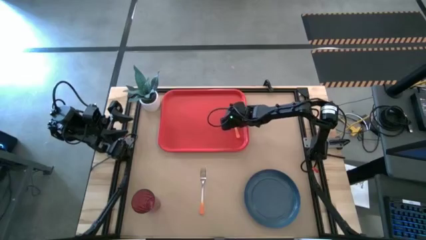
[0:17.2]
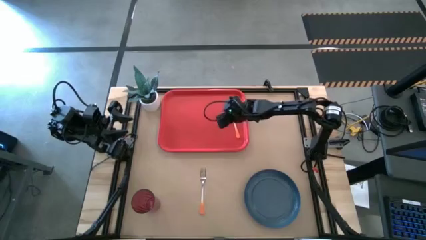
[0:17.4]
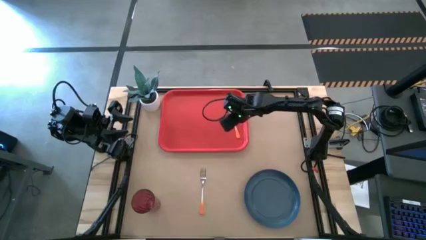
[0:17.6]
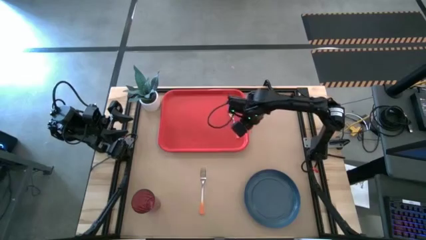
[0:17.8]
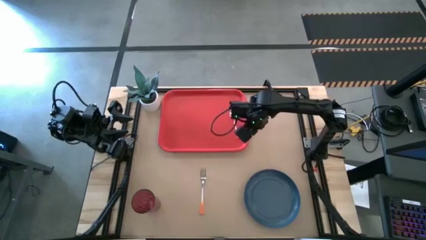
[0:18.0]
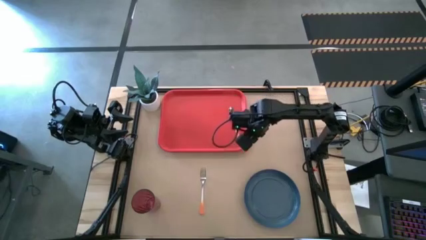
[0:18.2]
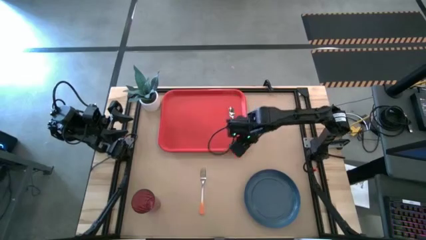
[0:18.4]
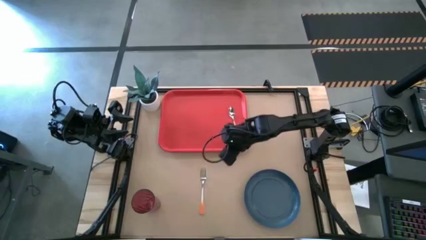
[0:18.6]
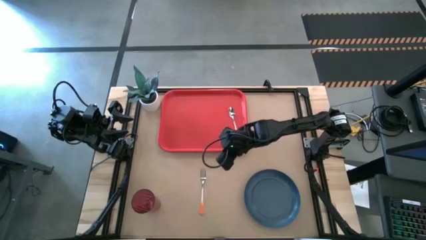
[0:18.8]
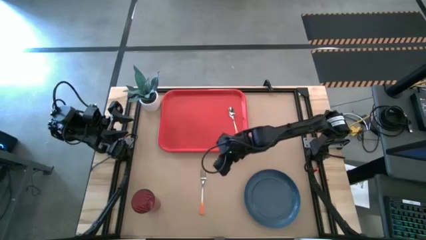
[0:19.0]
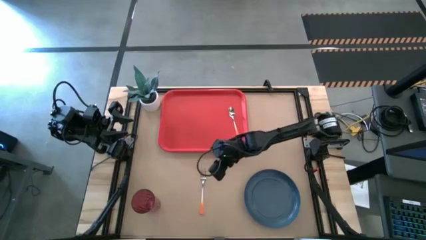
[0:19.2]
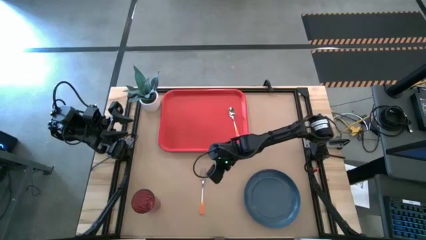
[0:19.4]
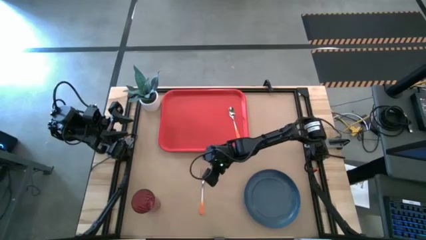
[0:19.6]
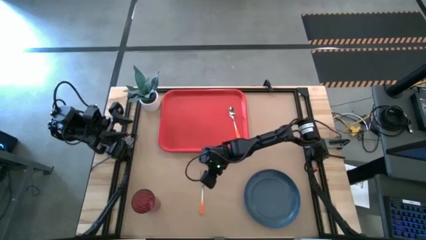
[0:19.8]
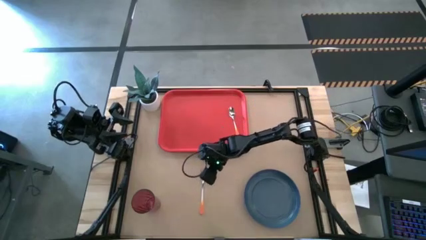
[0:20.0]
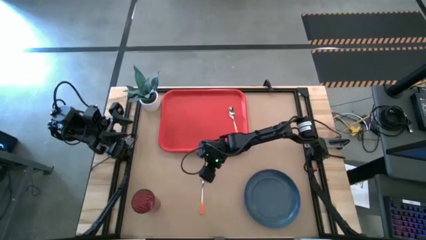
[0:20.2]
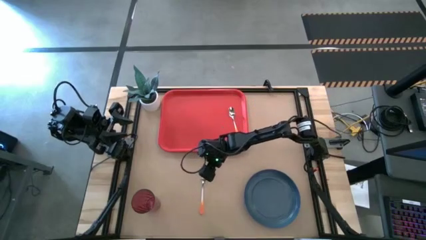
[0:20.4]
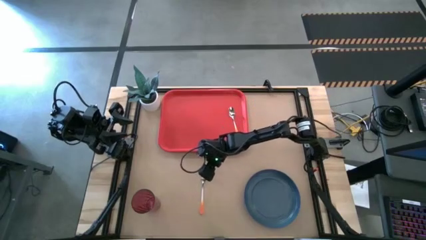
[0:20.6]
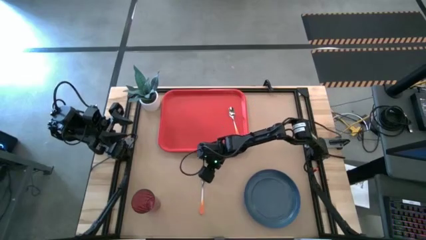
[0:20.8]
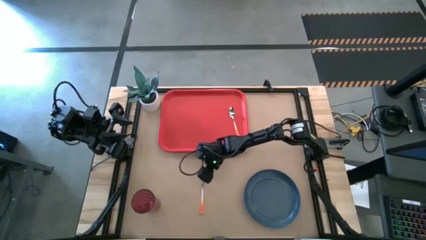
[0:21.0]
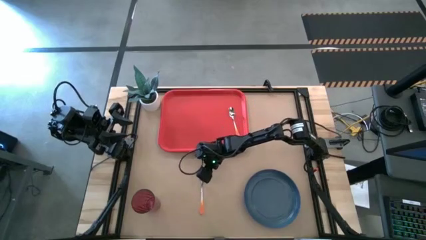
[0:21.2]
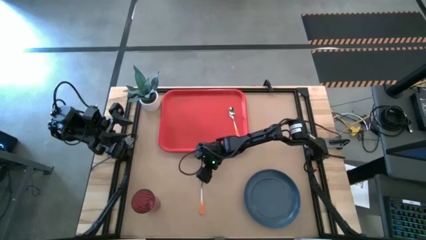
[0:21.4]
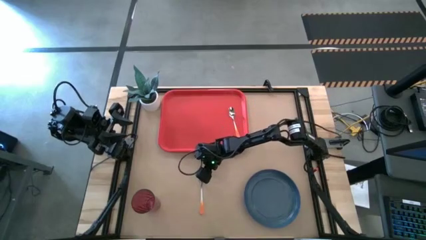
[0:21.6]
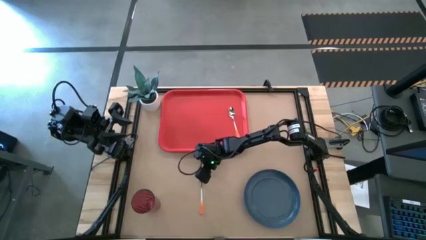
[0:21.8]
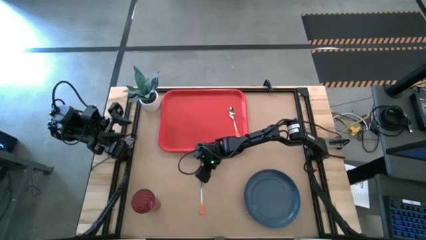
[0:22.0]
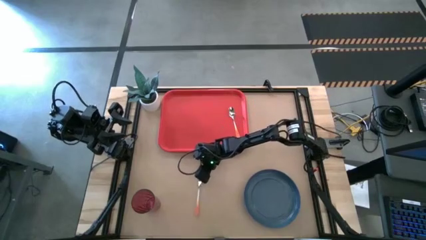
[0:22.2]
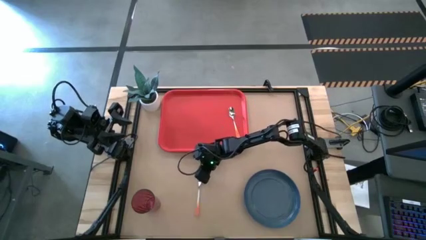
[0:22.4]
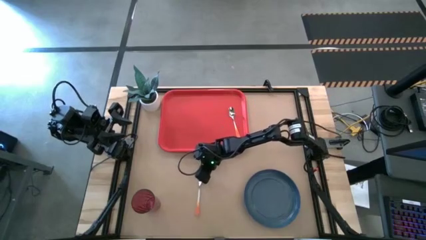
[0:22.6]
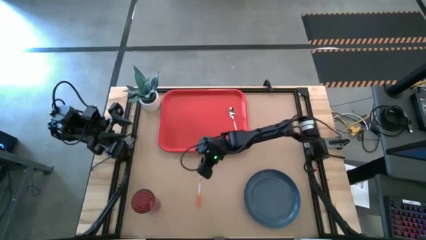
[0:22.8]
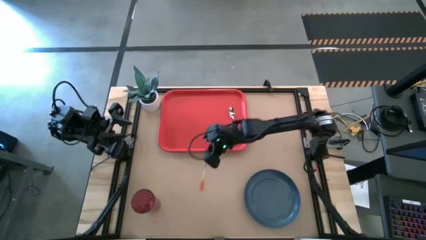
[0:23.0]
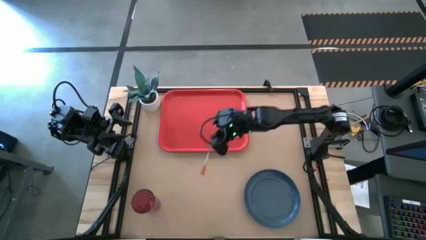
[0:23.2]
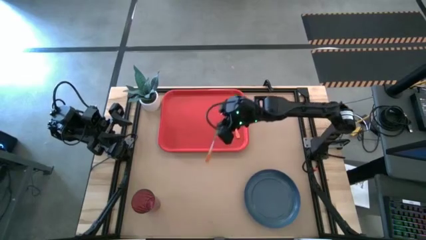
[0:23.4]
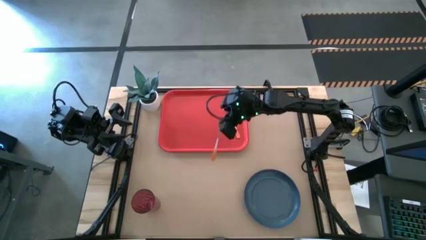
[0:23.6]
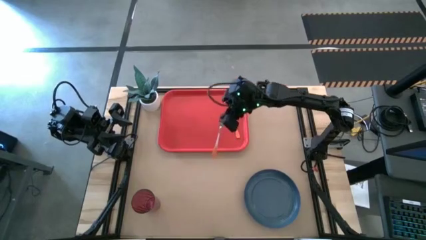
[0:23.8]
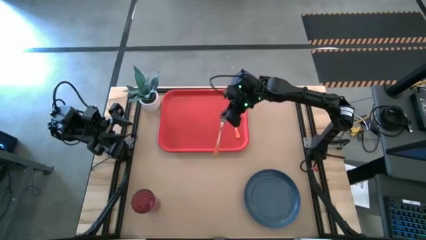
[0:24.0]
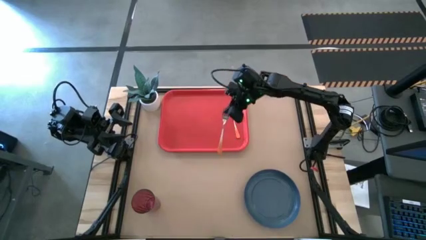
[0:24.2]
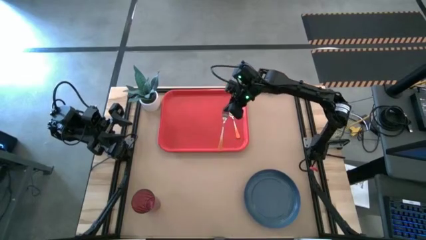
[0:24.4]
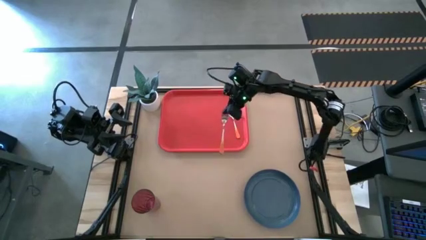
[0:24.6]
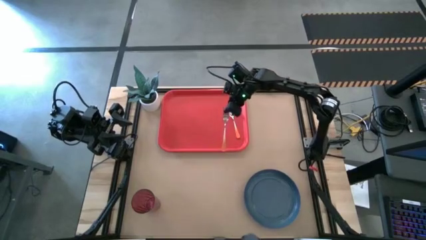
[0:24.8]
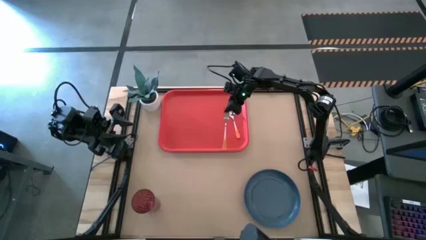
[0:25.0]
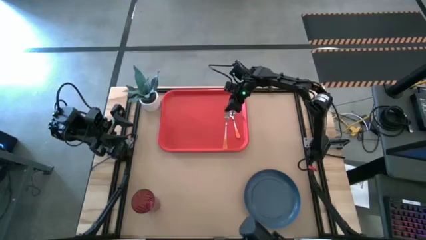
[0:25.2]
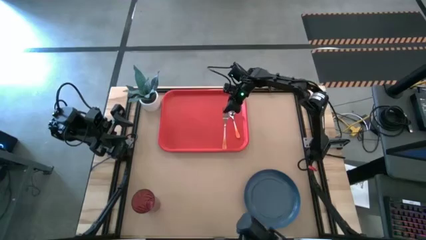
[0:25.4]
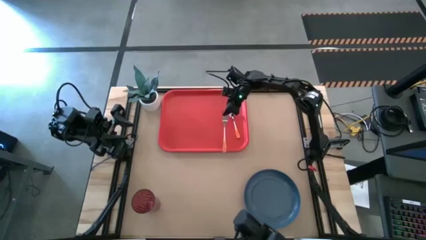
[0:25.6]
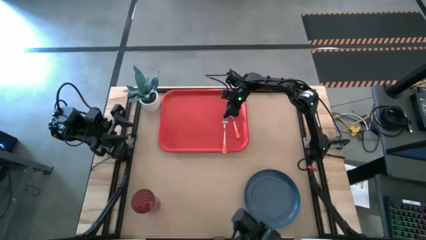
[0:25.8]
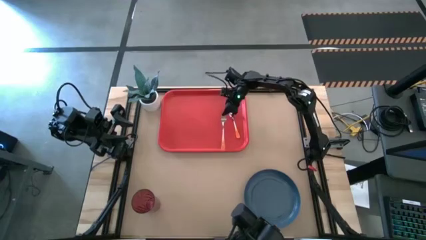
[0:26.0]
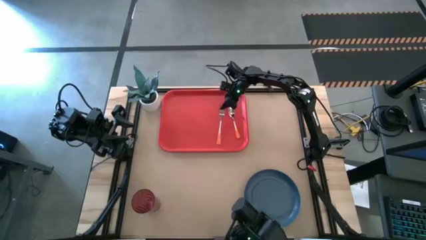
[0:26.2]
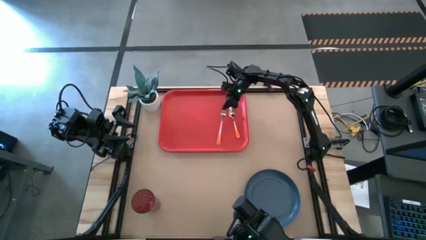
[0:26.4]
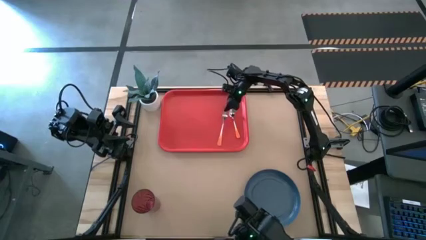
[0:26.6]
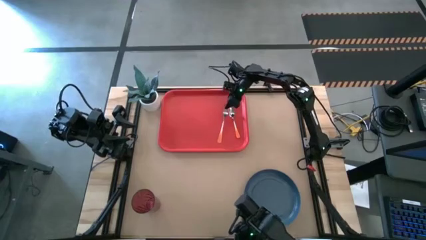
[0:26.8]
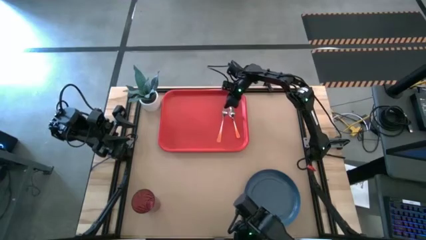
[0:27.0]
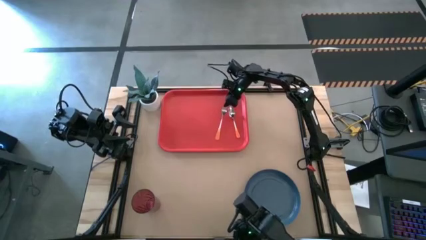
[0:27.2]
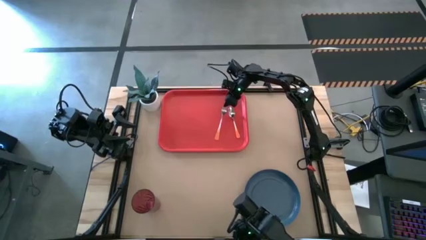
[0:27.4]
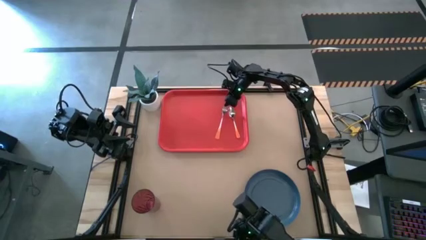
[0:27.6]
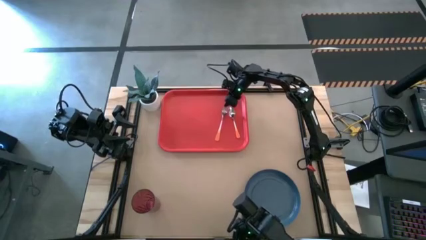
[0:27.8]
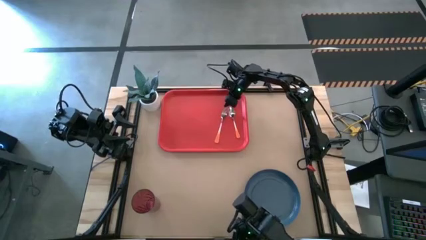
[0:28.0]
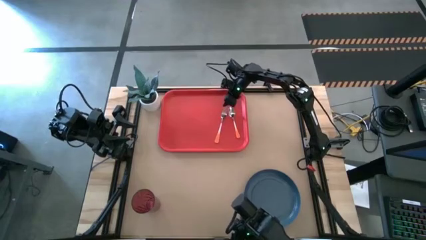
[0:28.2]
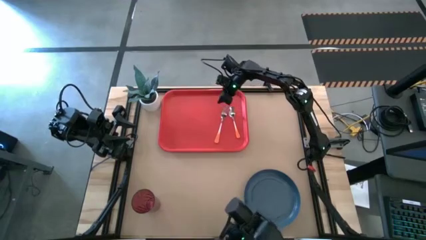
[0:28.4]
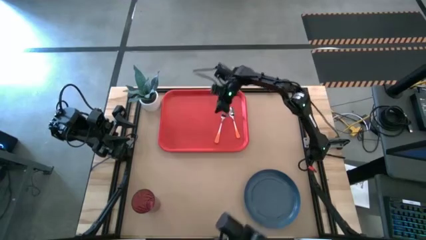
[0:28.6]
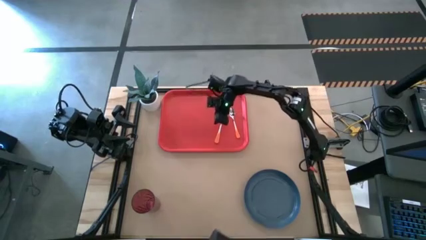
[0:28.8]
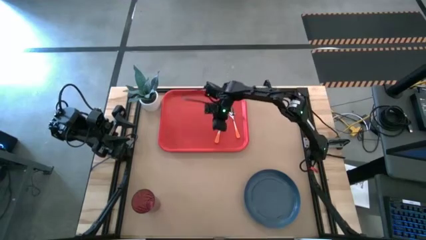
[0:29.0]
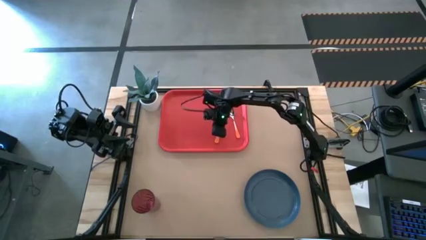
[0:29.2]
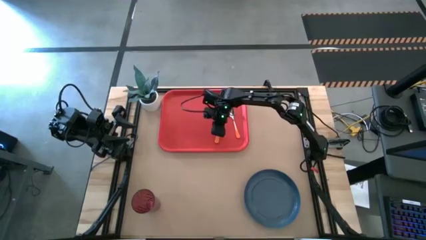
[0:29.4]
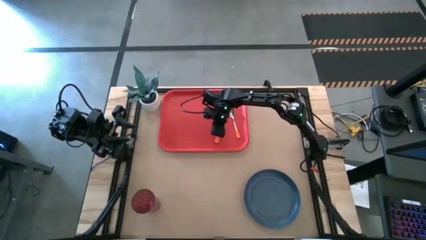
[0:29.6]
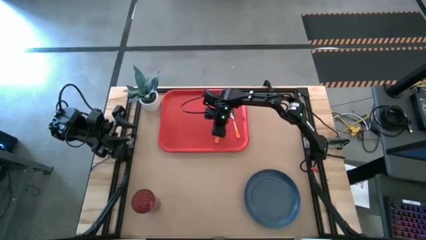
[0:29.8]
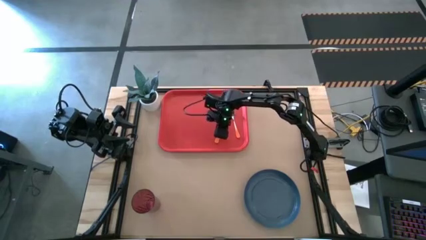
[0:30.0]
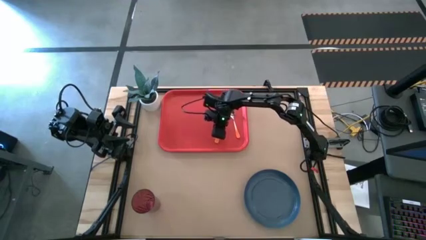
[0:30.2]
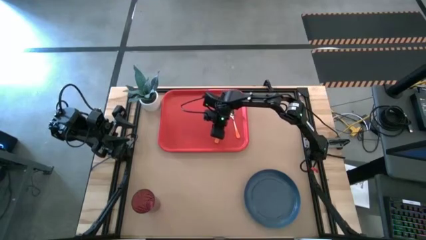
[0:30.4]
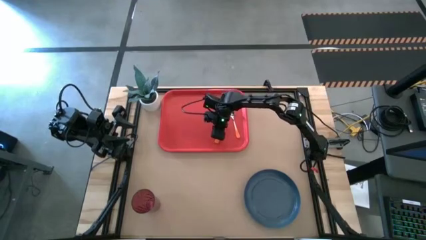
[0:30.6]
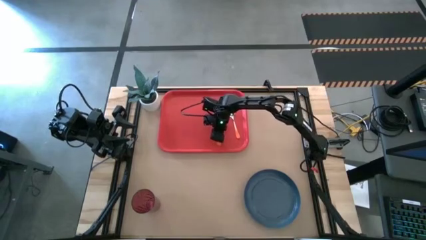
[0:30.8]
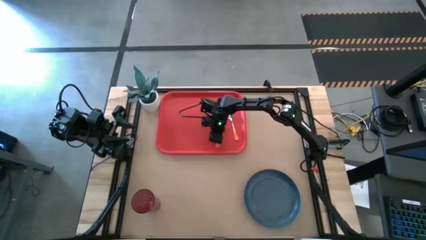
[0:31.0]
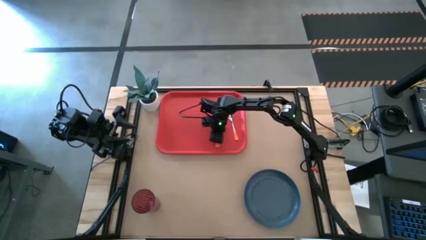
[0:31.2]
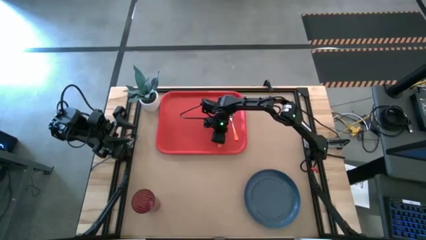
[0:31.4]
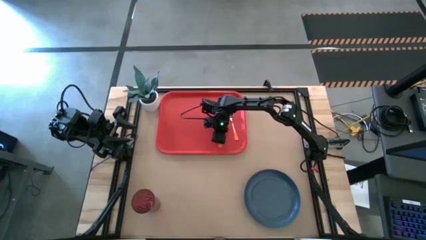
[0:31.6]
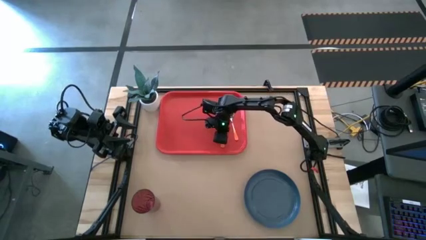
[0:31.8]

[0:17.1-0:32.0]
Task: Pick and place plate/cup/fork/spoon on tray
Put the orange fork to the left of the orange spoon on the red tray

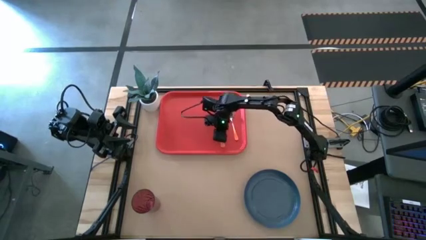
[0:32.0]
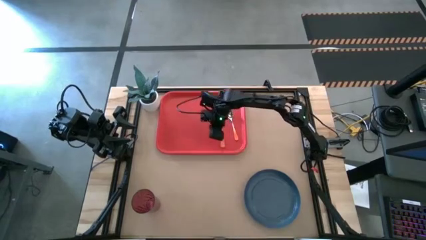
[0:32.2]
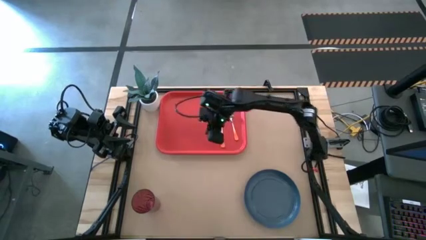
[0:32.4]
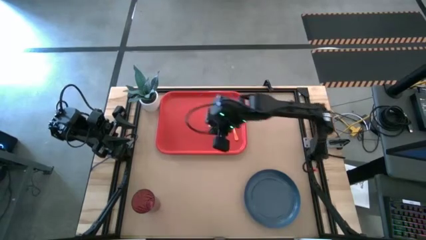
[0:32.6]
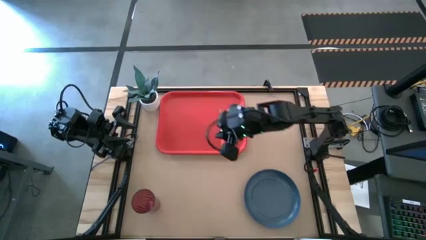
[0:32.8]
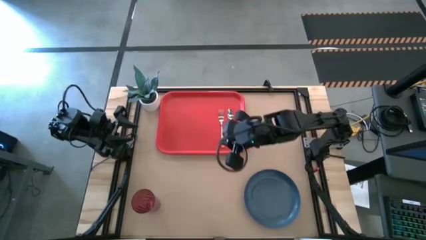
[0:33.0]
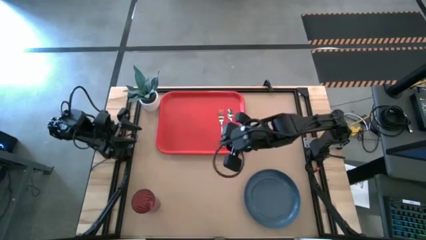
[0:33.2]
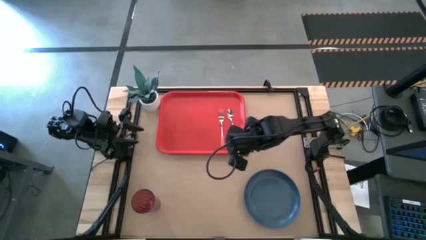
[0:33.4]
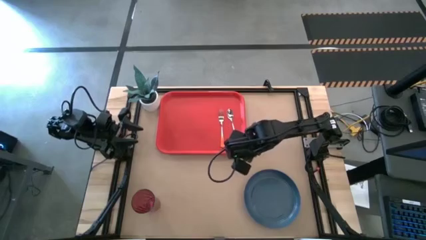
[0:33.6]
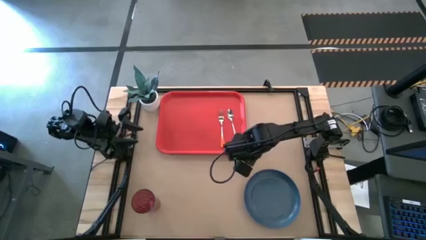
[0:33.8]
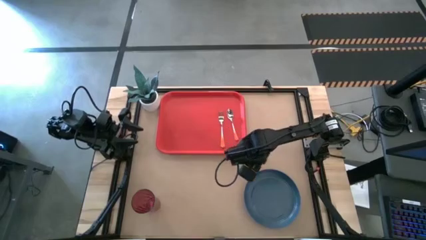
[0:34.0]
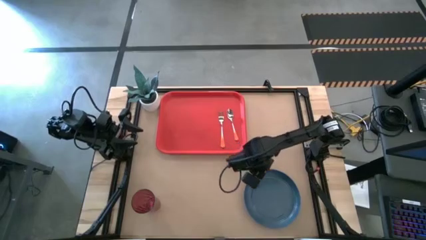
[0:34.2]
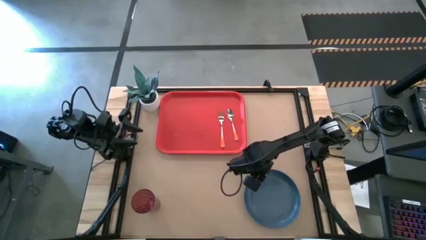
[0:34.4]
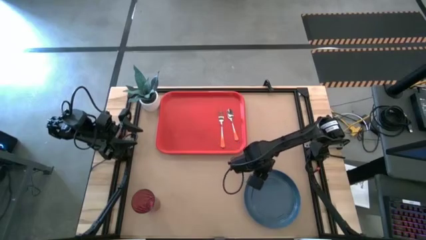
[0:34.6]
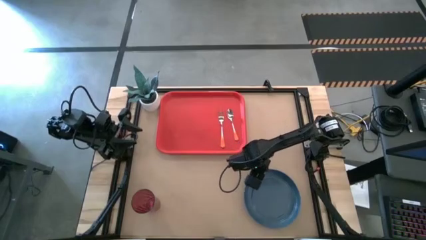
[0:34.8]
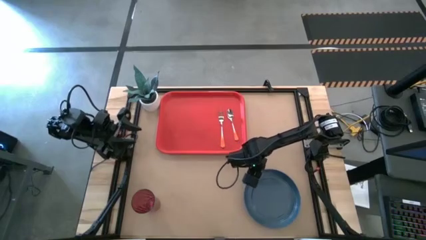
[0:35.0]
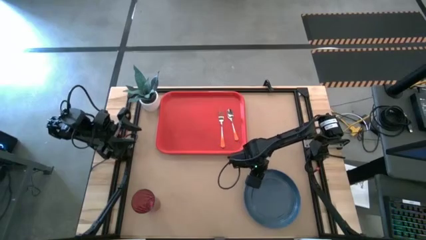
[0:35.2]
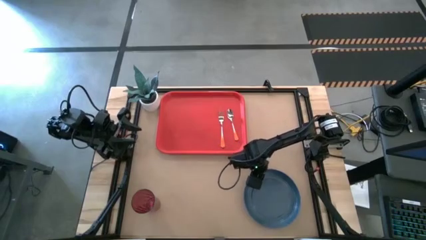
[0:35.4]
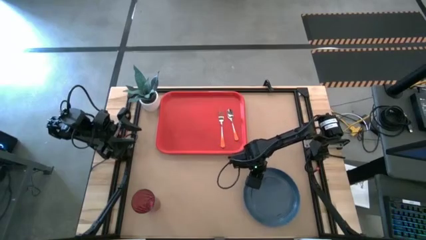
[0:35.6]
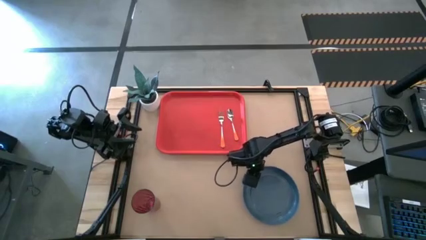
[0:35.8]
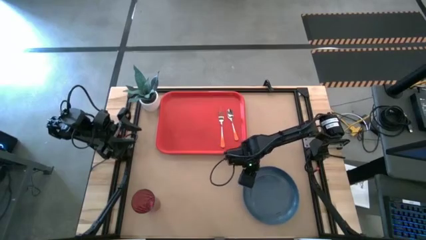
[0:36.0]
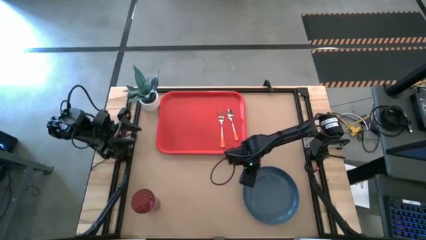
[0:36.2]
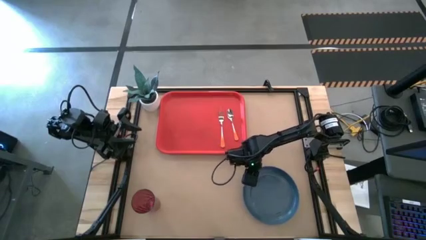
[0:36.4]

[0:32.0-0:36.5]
Put the blue plate on the bottom of the red tray
